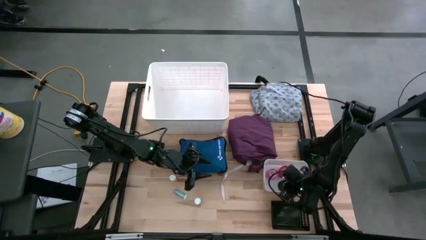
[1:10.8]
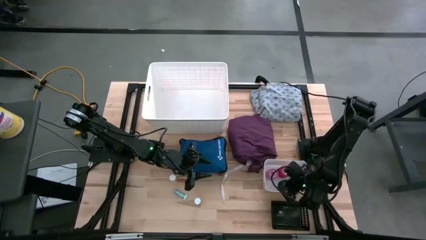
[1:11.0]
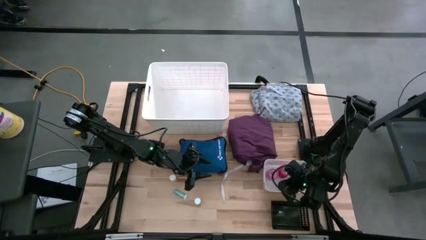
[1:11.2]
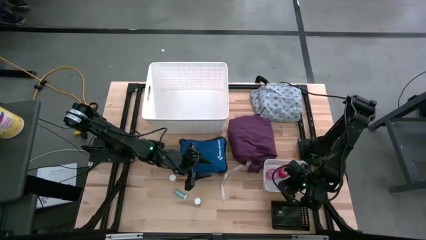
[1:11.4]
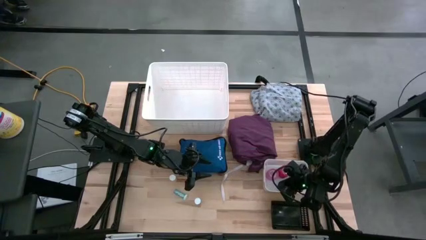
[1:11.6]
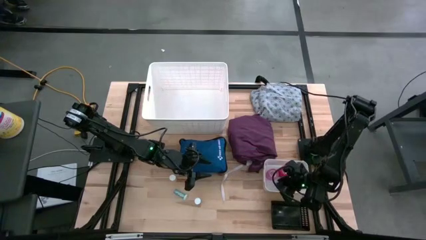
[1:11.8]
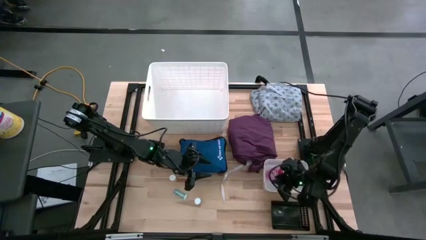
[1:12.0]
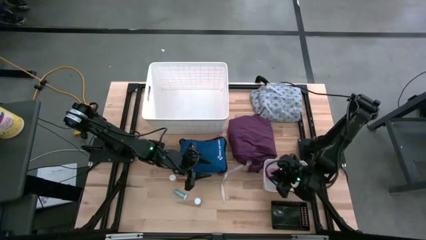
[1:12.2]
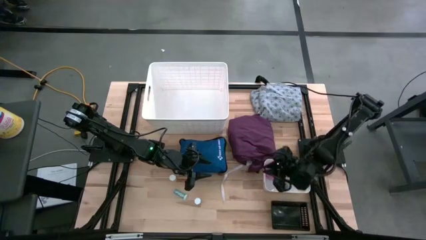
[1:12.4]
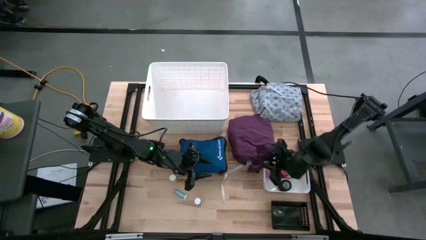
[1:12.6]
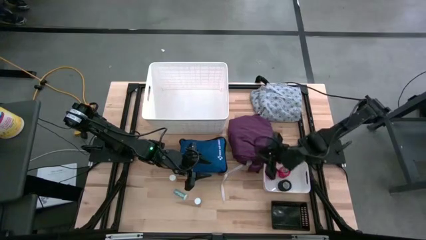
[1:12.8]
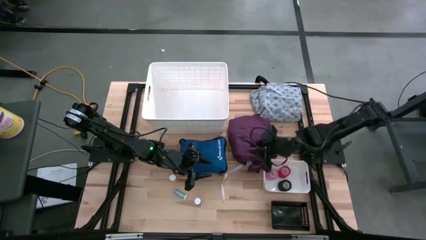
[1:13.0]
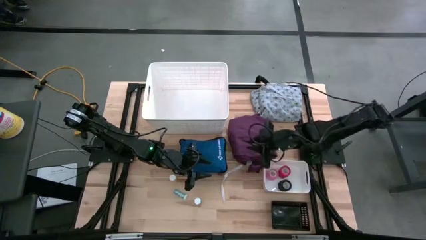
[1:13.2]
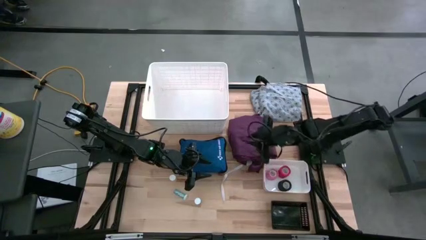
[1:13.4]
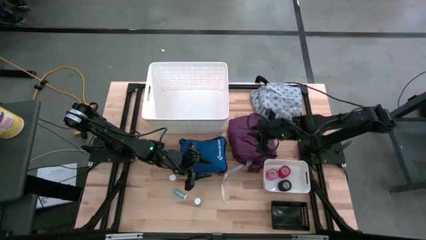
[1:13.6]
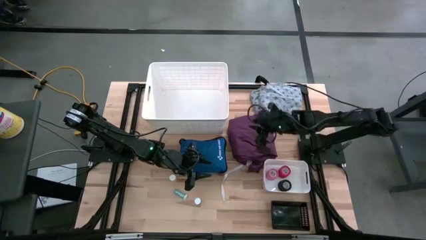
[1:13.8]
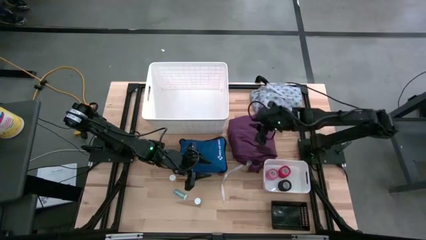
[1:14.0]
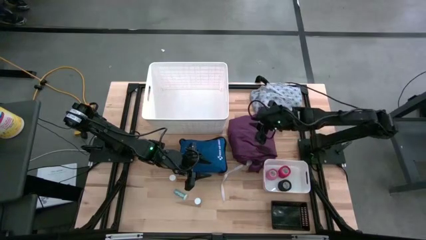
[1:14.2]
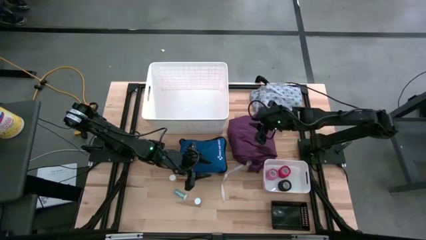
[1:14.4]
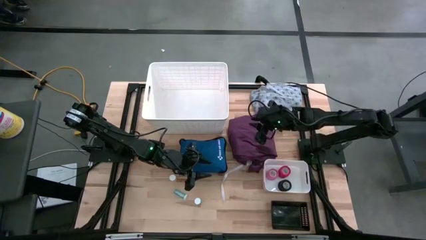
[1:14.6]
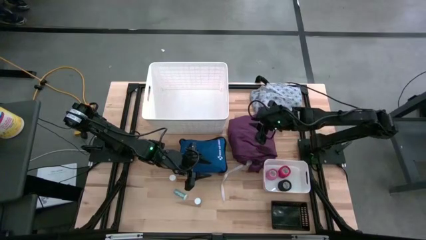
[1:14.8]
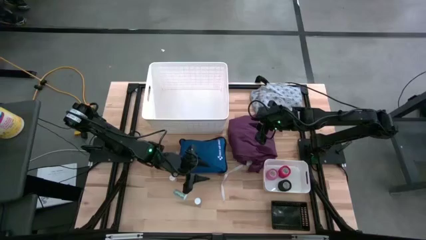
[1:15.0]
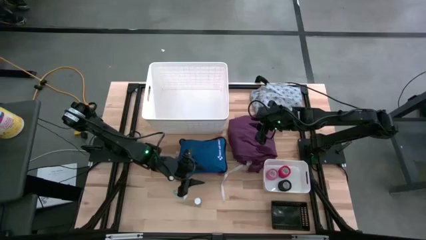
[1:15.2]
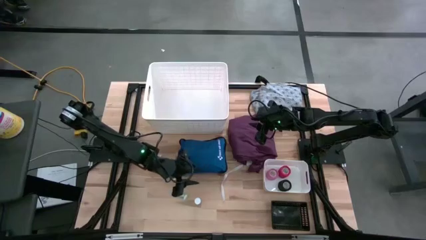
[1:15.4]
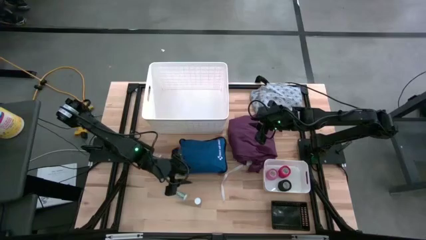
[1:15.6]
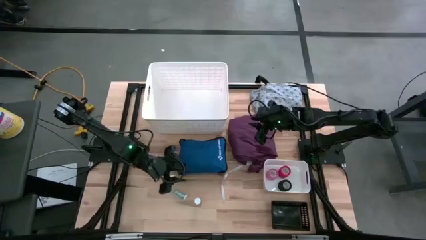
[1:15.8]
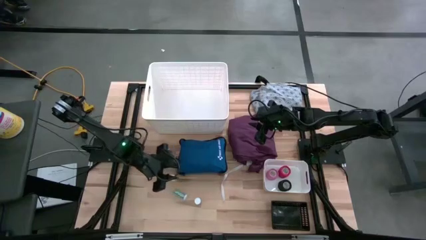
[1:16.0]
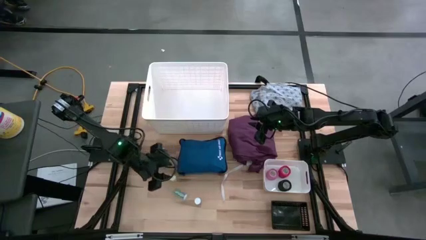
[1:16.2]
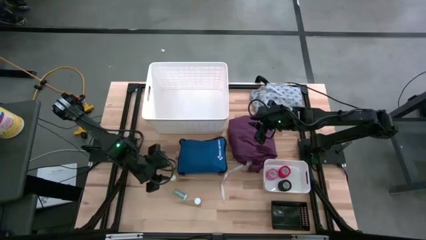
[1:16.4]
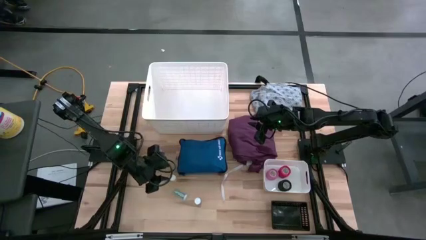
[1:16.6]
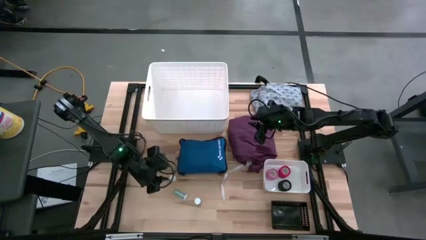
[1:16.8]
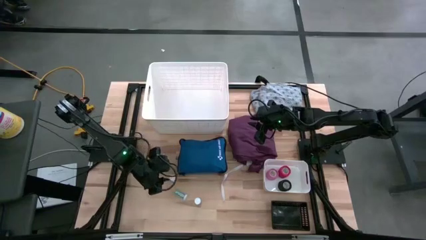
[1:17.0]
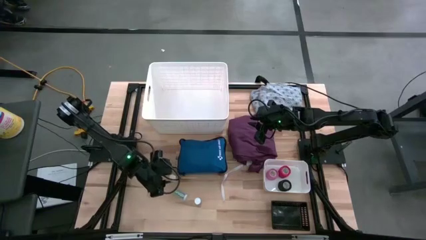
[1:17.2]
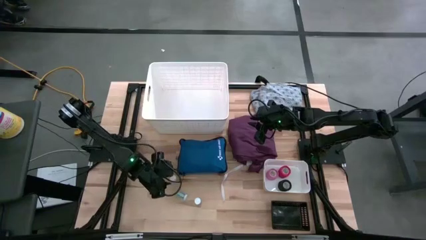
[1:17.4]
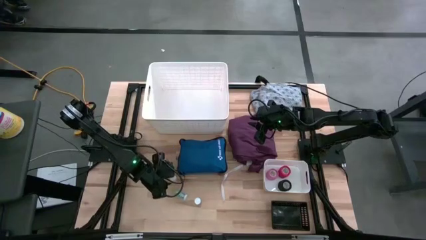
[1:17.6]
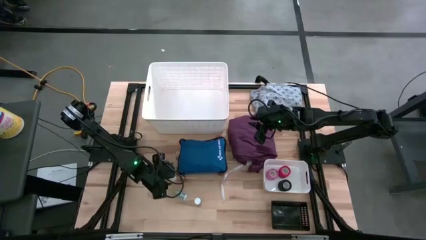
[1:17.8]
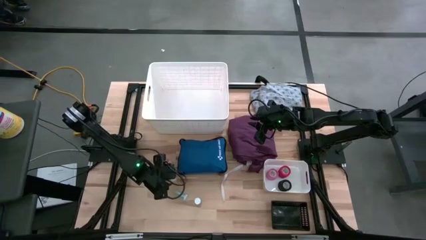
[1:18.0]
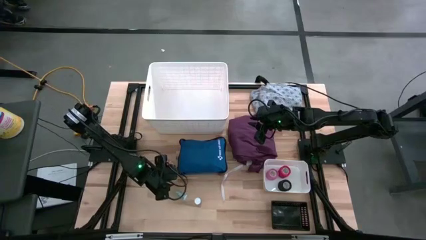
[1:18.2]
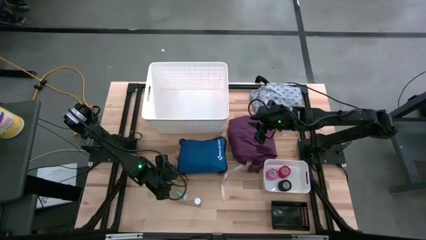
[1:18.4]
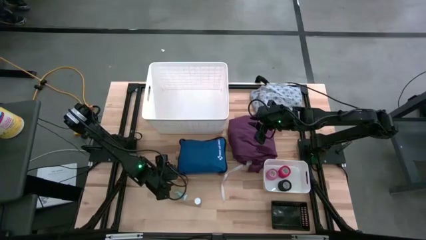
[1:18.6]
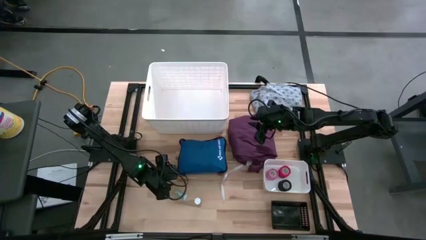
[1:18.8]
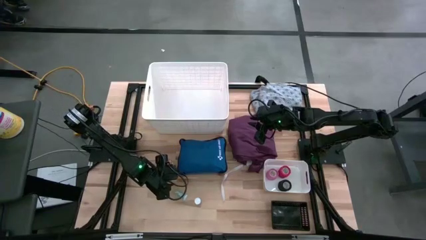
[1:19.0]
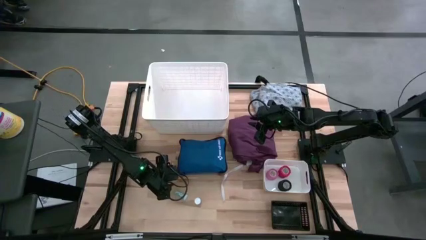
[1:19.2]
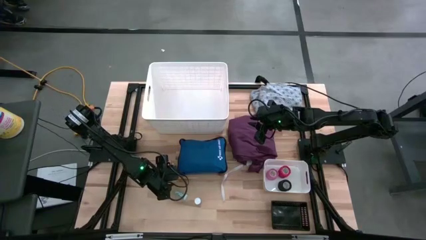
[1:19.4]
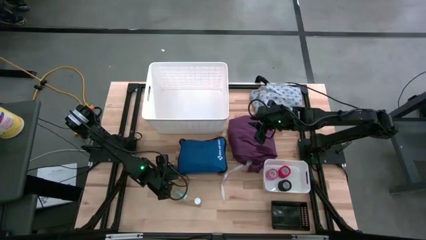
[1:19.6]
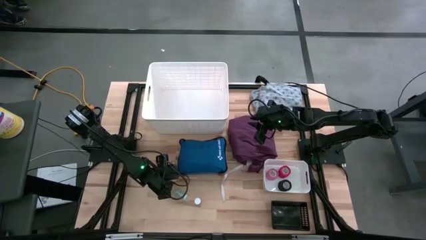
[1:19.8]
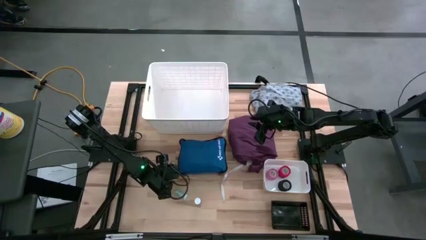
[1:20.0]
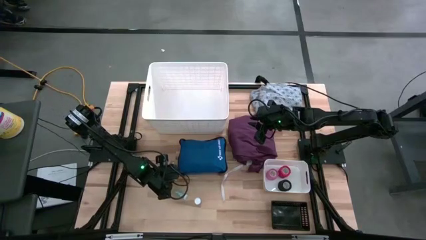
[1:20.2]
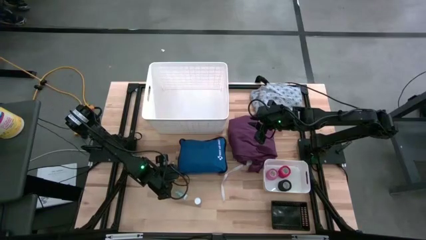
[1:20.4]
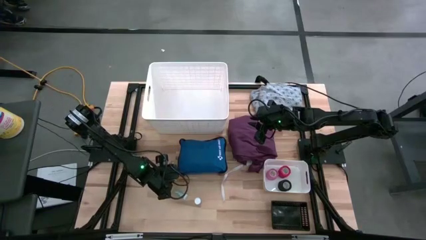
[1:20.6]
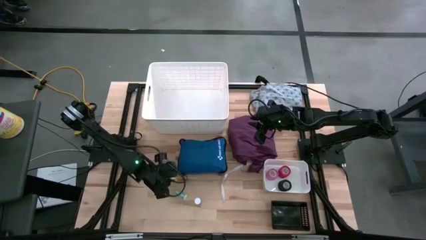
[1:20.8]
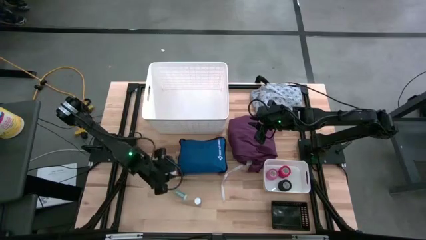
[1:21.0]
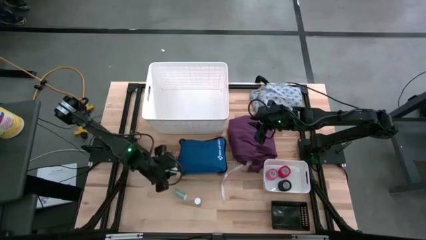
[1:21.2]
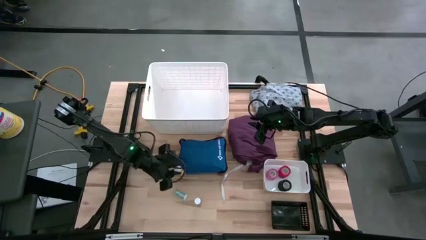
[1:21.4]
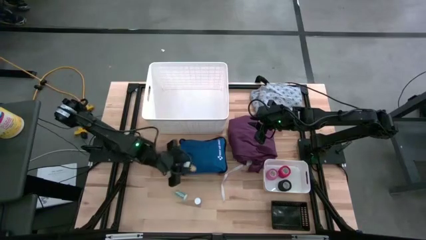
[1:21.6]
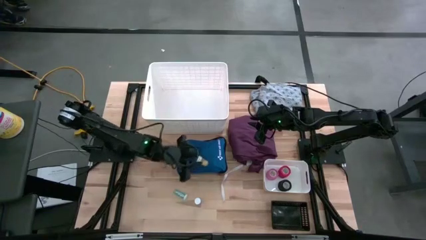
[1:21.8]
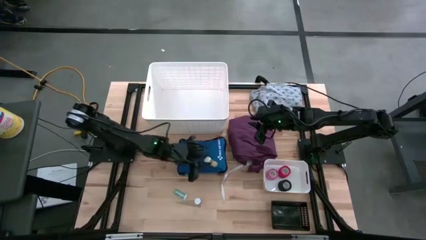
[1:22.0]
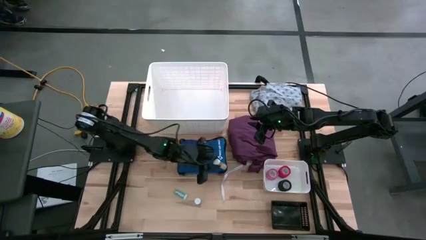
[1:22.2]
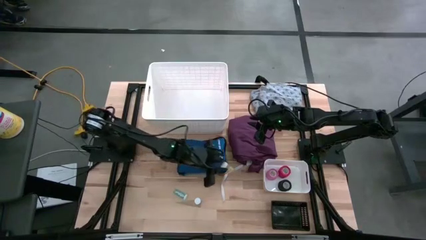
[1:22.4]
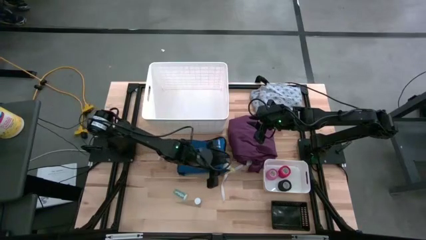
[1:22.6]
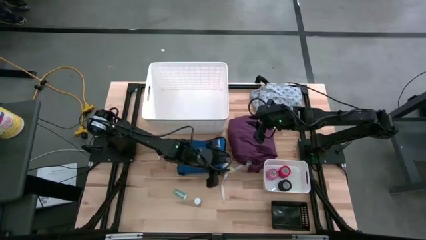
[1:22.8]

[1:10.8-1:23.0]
Task: Pick & Place Medicine items
Put the bottom yellow pill bottle into the black bin

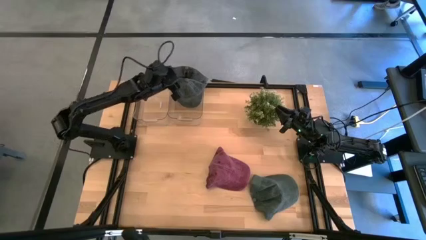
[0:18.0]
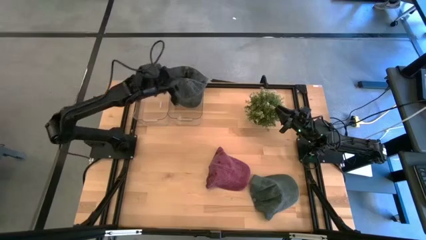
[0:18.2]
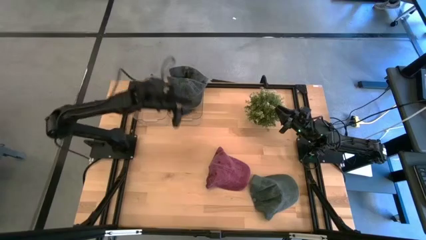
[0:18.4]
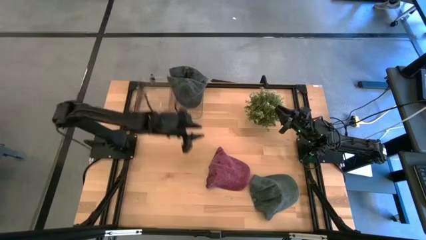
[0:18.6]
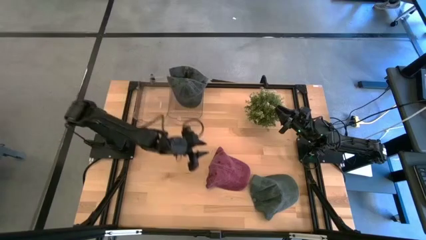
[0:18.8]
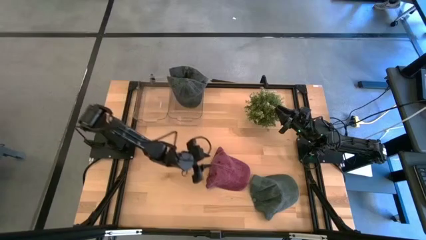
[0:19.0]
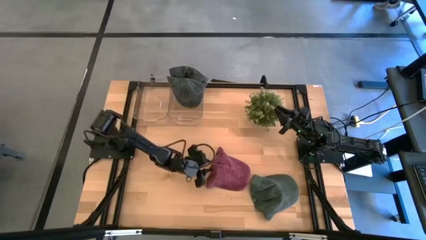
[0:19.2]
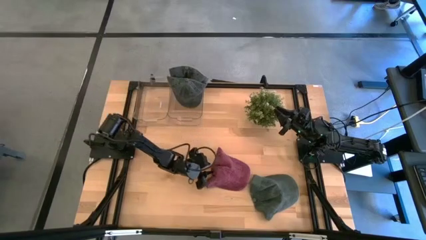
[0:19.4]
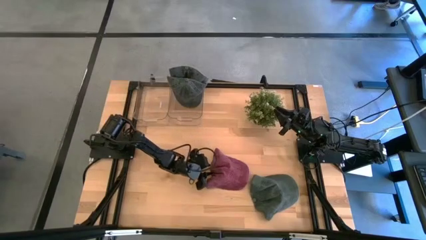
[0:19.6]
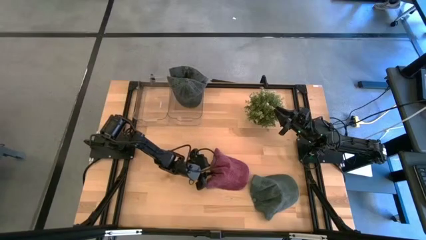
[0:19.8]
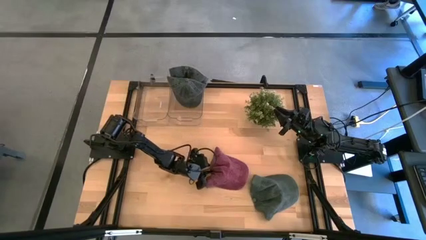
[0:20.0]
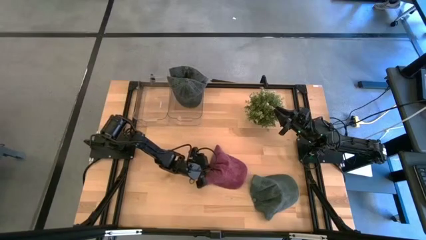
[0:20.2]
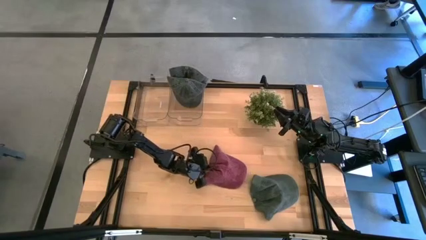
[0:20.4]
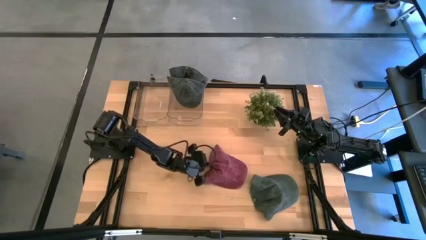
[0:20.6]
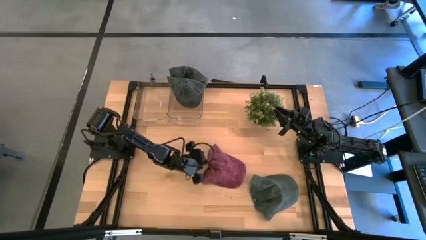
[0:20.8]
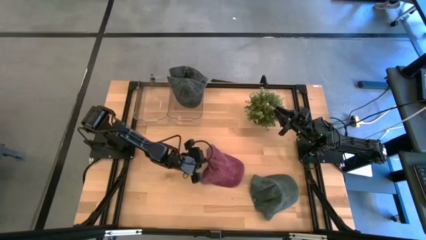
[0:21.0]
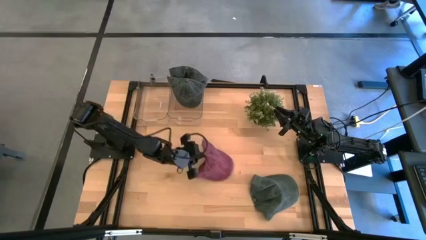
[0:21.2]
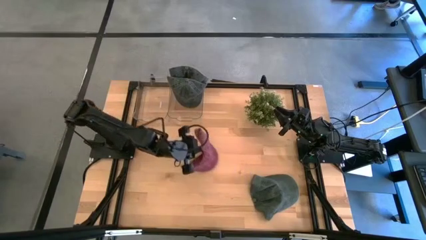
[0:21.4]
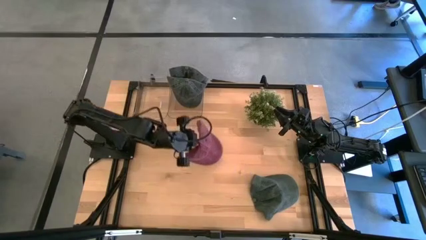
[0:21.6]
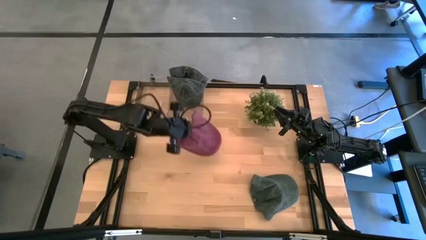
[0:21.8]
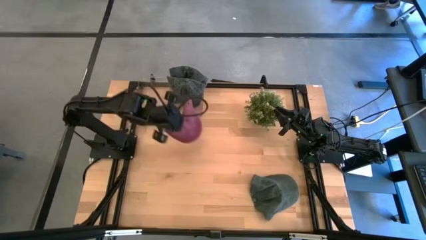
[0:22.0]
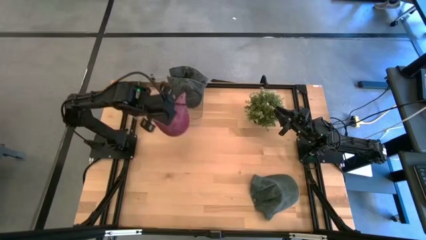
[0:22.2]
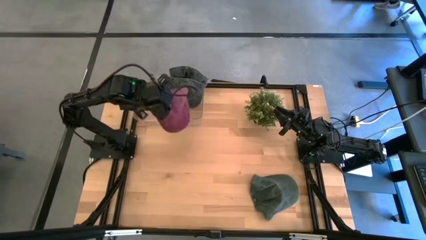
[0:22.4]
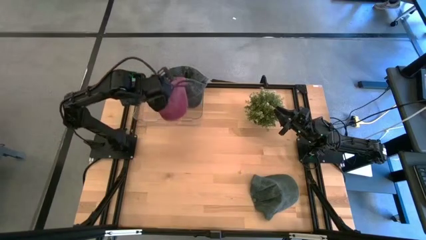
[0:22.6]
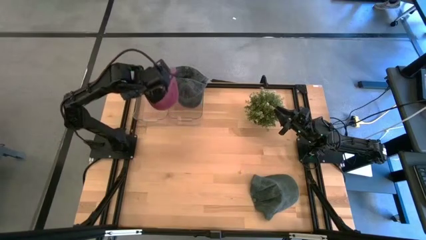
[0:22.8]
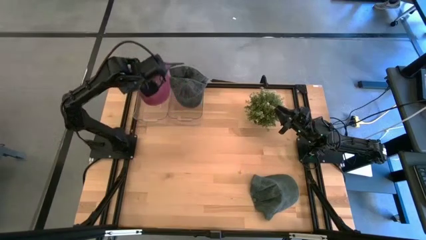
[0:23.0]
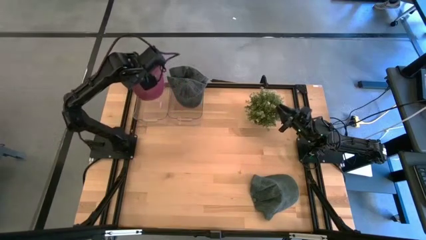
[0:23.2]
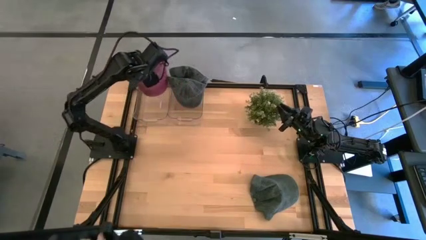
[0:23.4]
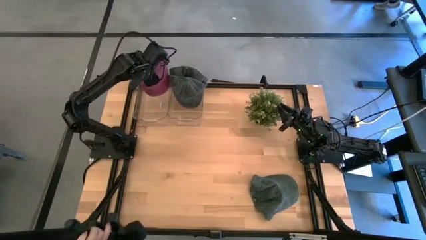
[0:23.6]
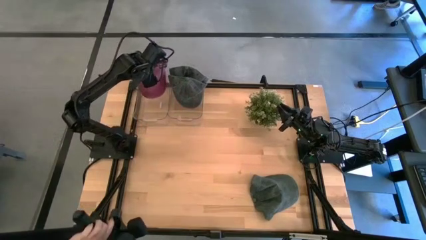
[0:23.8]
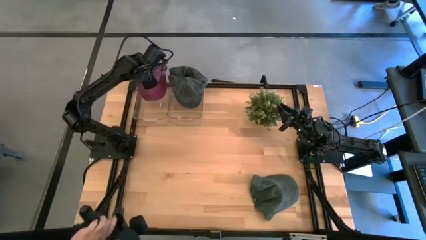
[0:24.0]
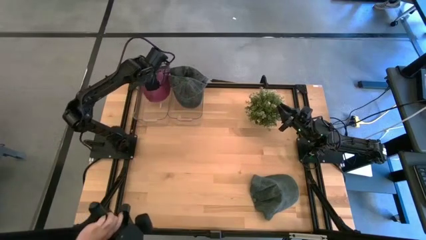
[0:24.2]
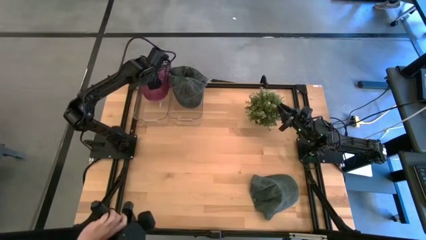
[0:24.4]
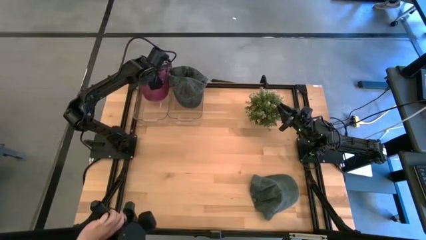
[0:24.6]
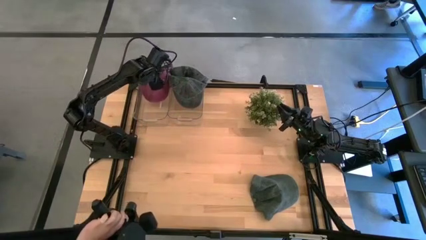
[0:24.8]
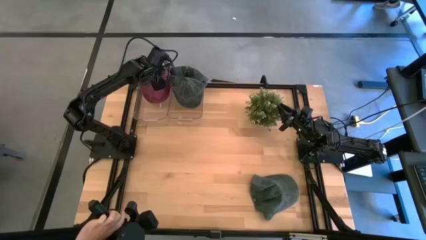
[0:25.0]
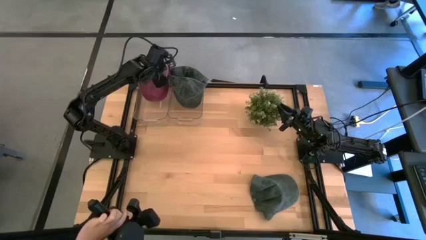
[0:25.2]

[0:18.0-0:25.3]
Task: Pick & Place hat
Put the red cap into the left transparent bin
